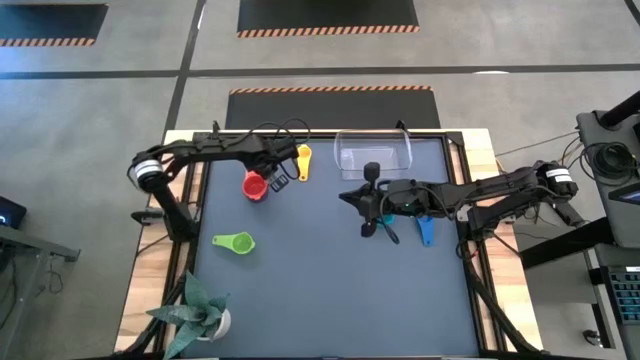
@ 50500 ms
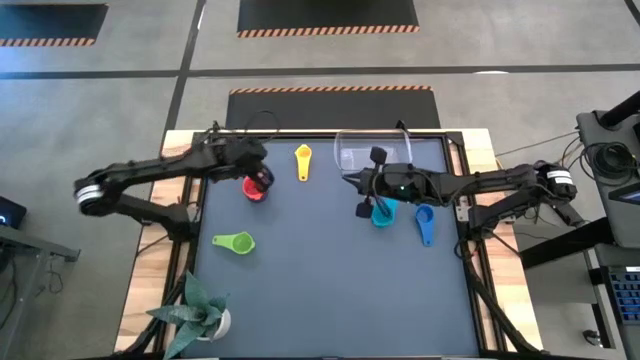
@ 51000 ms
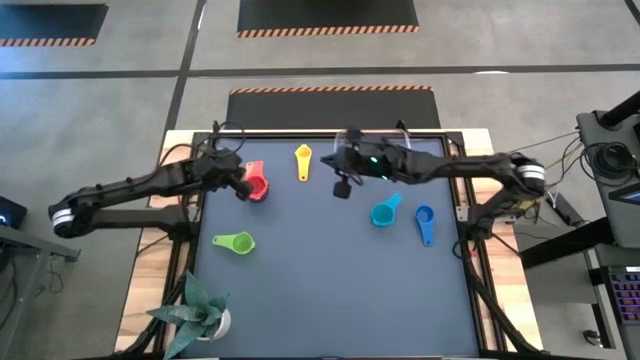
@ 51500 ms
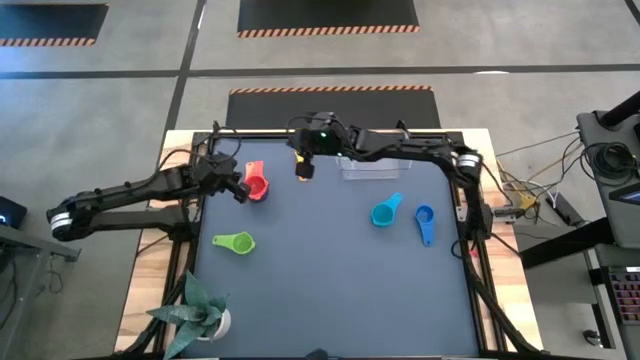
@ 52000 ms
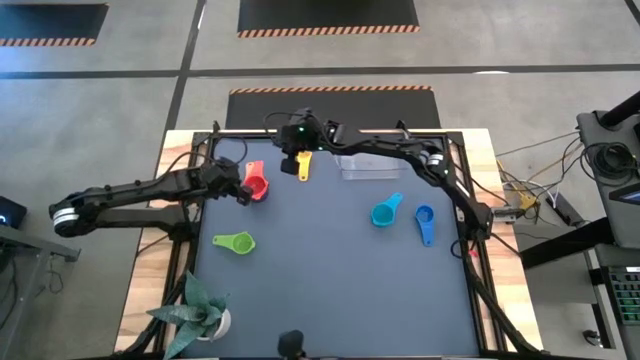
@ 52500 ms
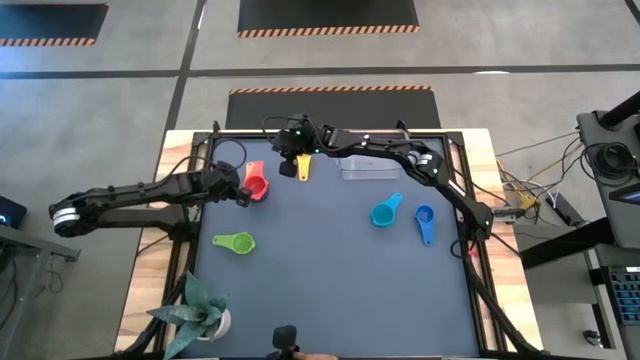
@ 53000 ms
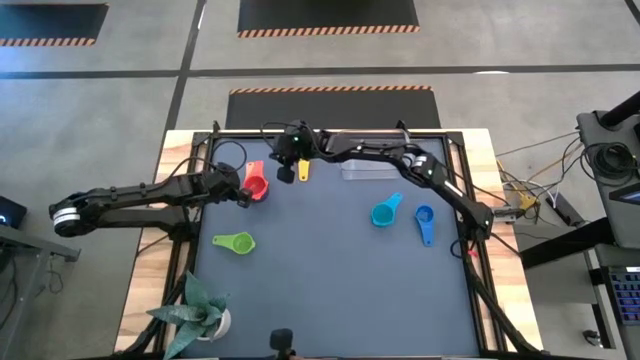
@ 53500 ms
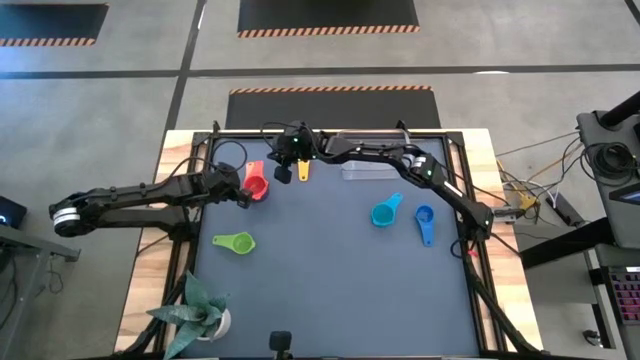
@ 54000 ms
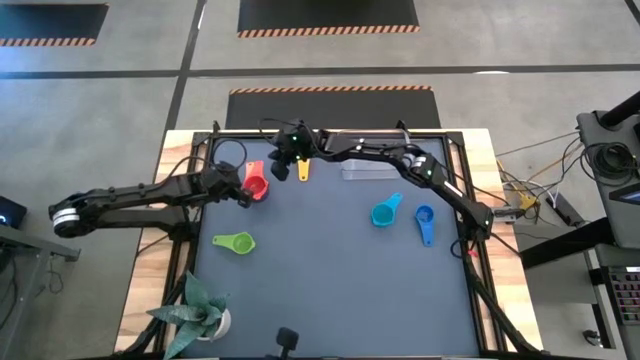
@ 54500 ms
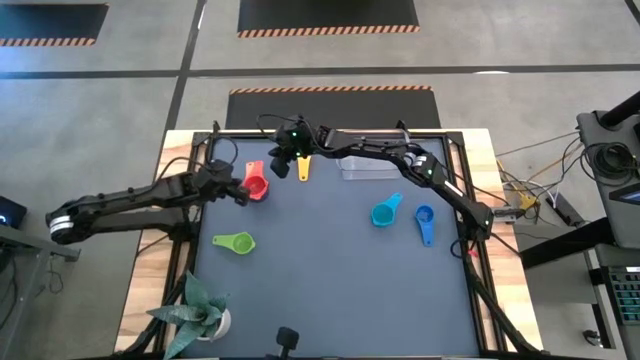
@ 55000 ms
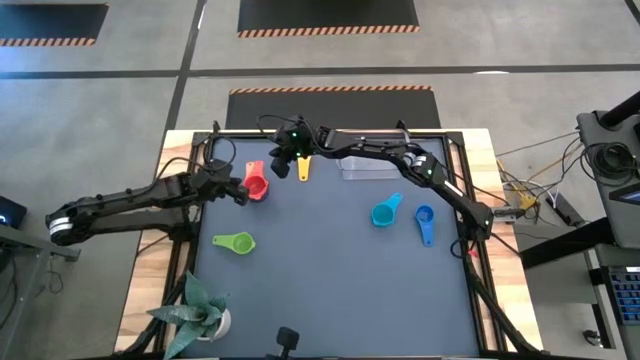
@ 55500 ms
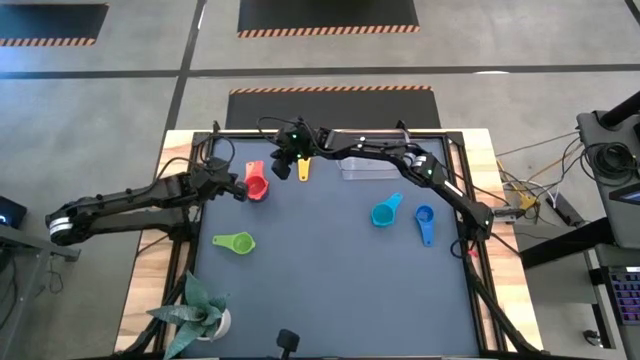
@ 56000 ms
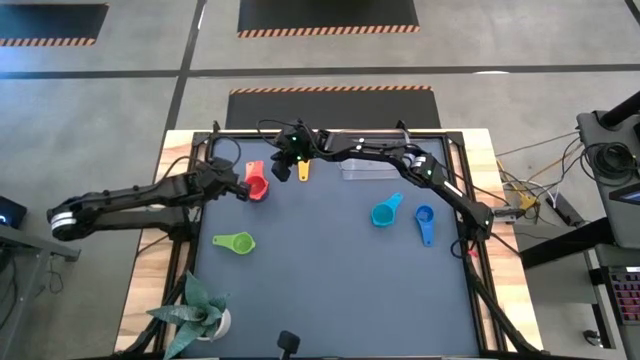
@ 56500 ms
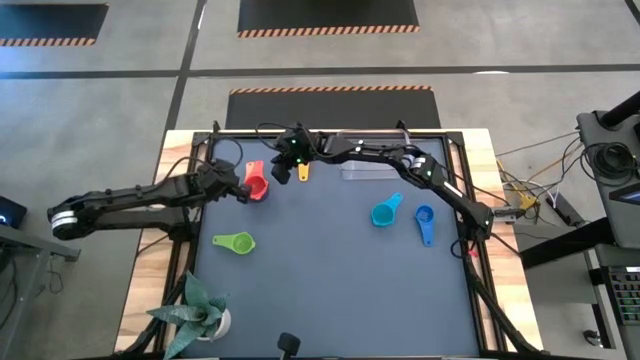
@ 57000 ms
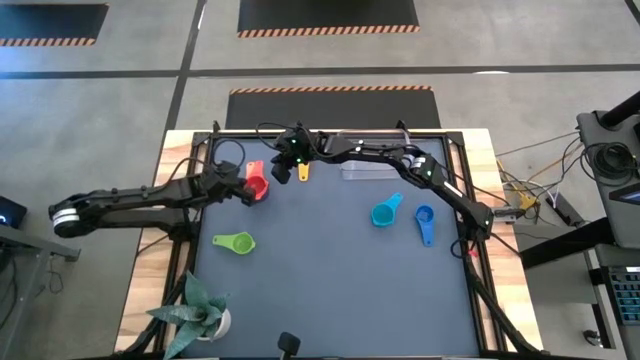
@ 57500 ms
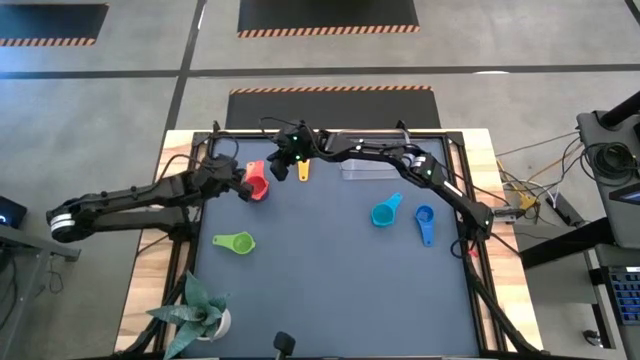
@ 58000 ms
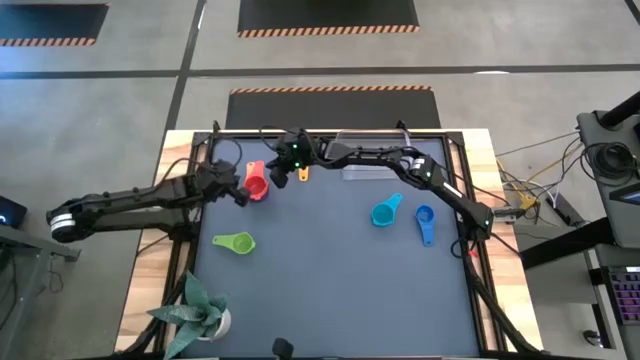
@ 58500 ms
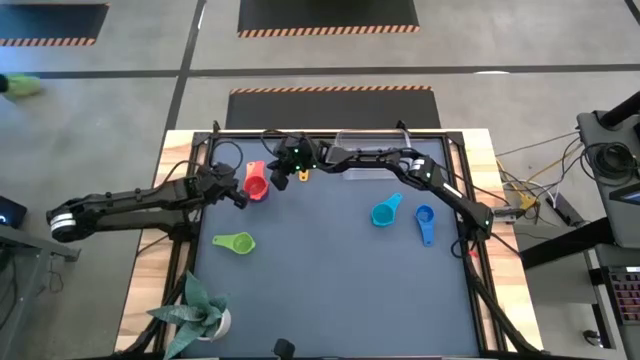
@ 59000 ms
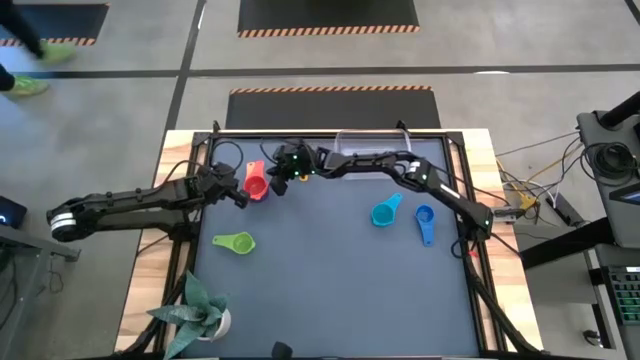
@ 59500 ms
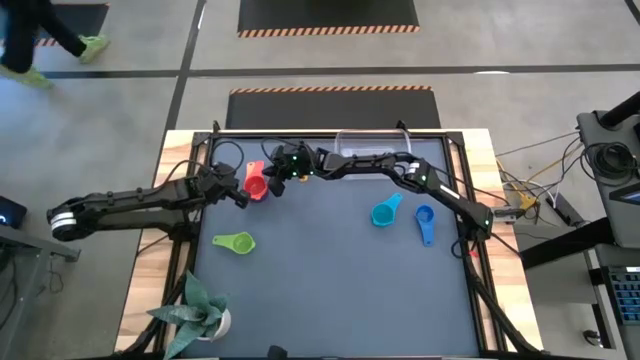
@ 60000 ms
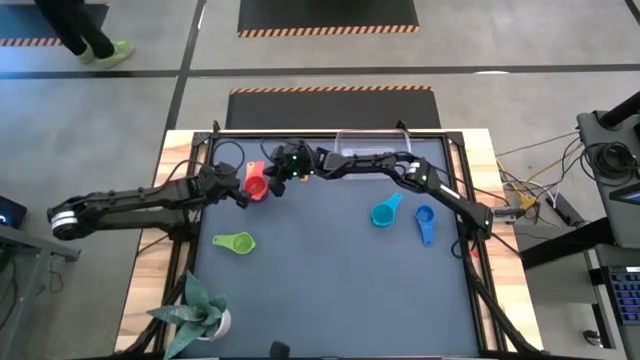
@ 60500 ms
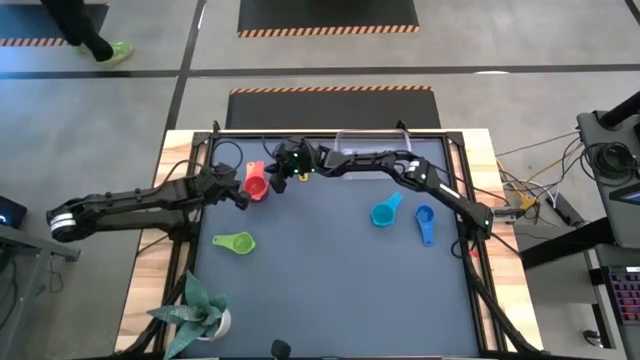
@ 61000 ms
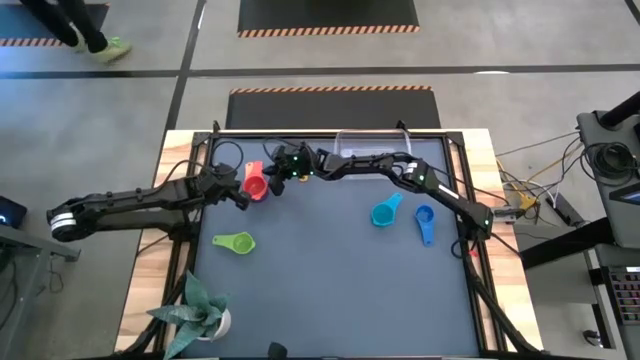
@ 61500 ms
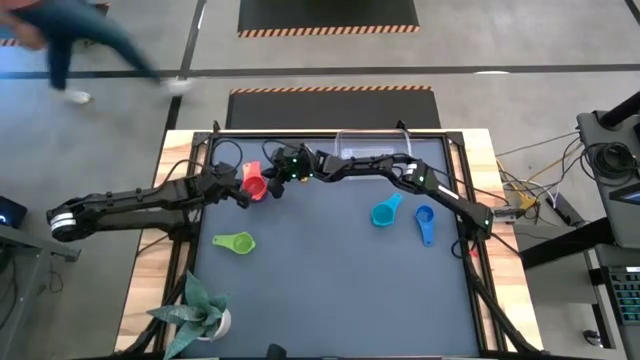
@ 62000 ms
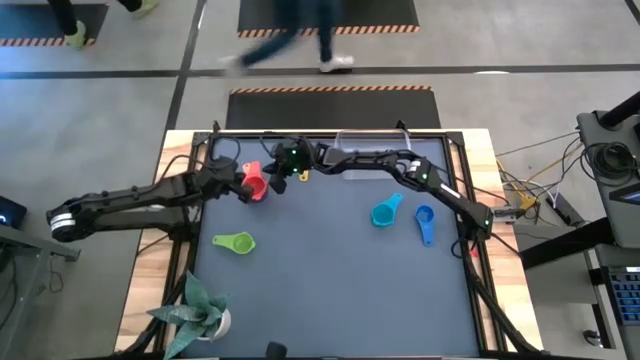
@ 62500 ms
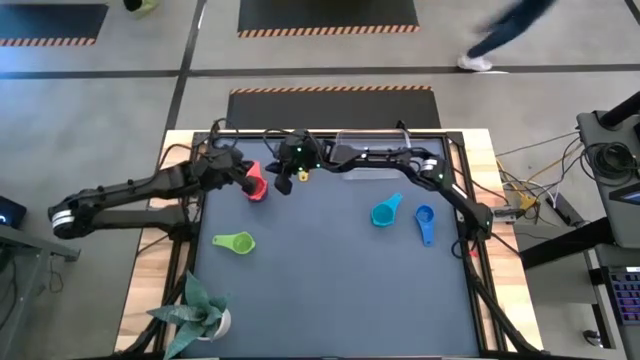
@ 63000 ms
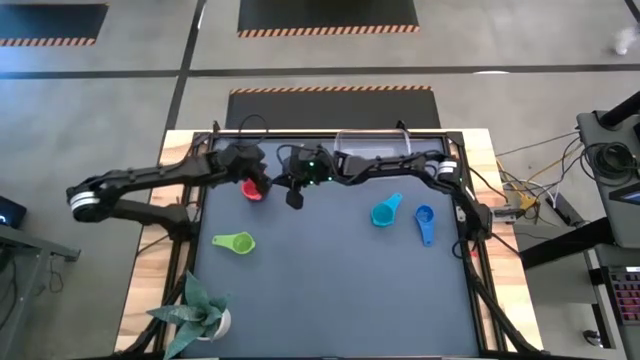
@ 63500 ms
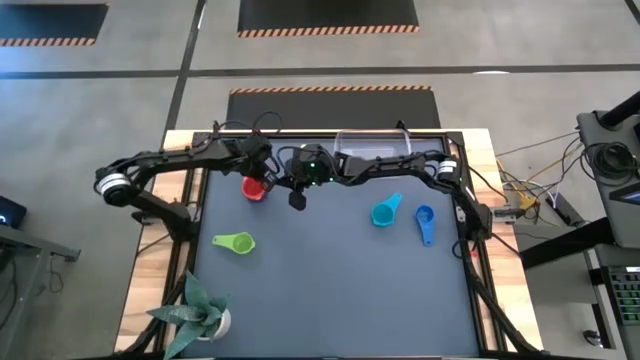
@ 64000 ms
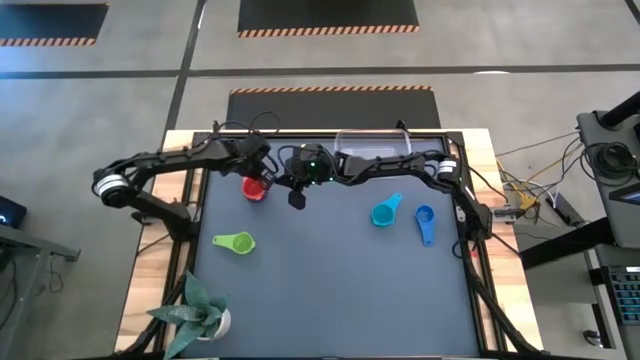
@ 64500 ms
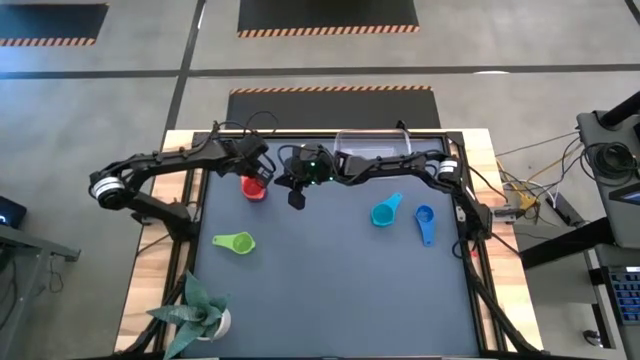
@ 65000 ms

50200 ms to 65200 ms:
Task: Nest measuring cups in basket
Stack the red measuring cup on top of the orange measuring cup

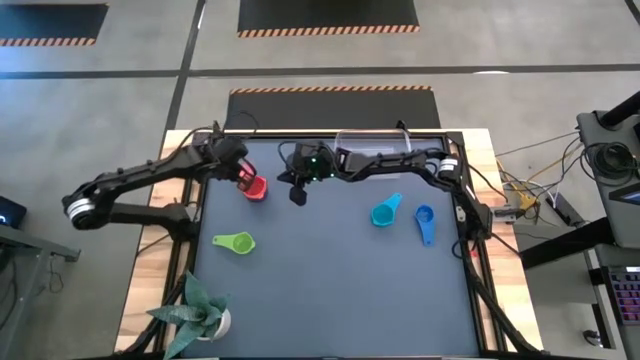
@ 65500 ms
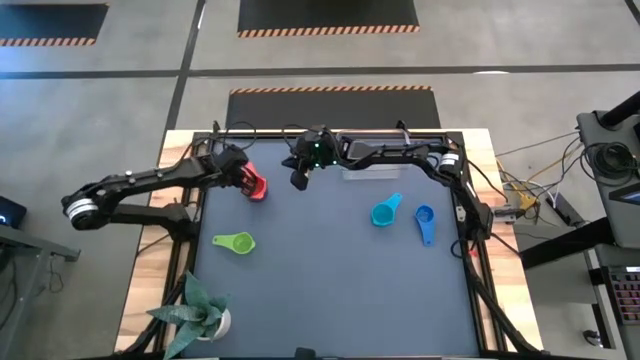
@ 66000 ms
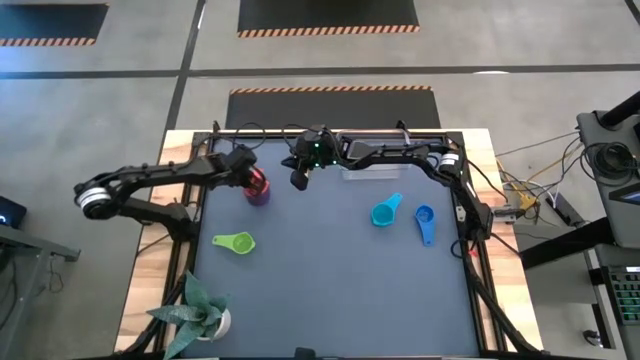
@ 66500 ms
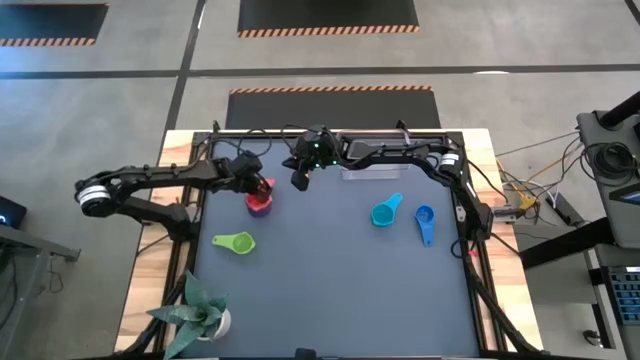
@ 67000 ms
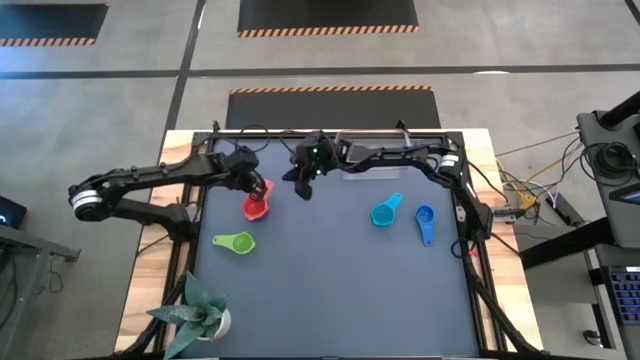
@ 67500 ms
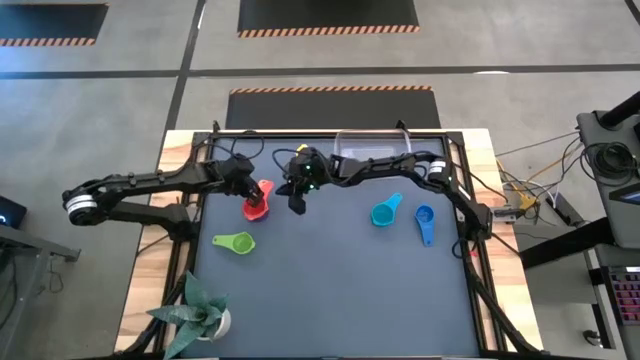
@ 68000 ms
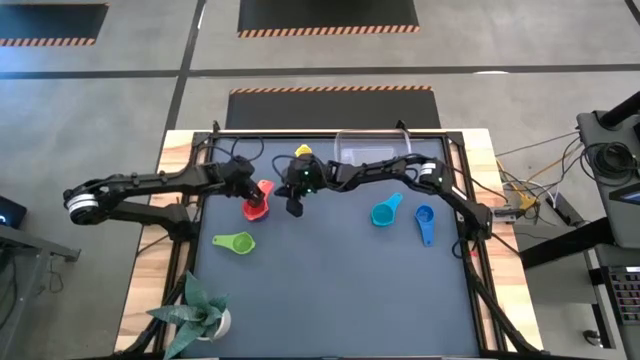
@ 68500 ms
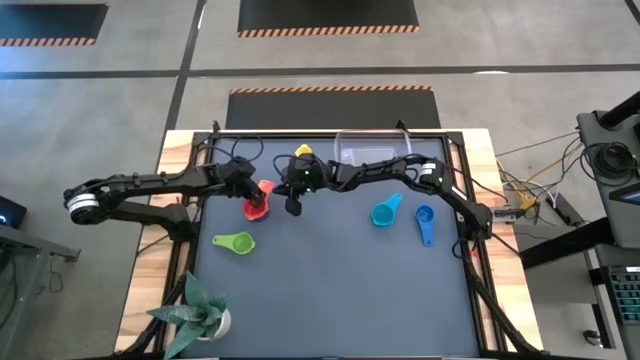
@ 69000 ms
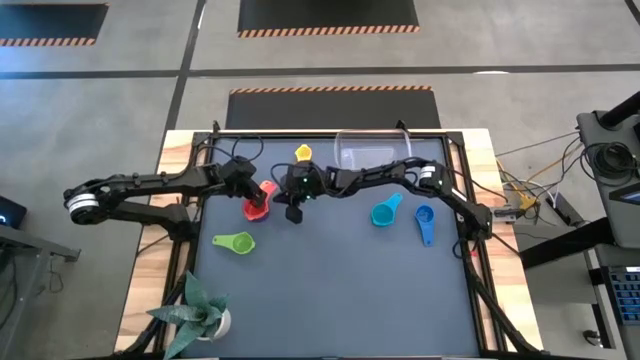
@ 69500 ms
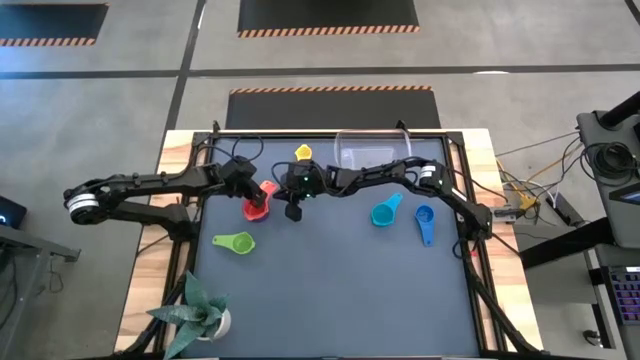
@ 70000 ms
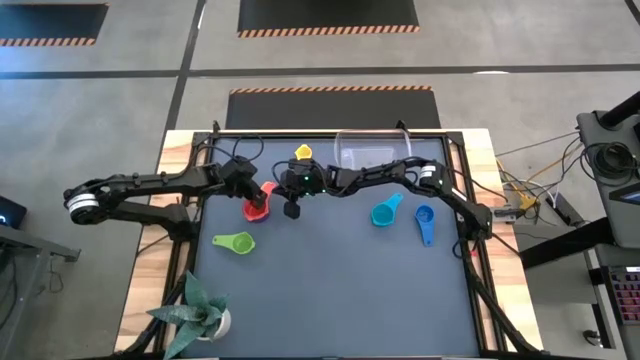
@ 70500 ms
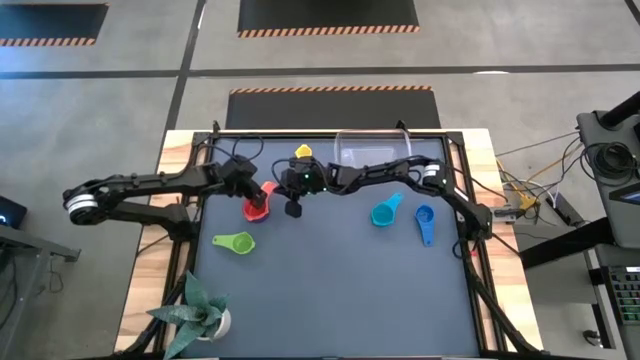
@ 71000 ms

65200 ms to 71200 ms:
Adjust the stacked measuring cups
